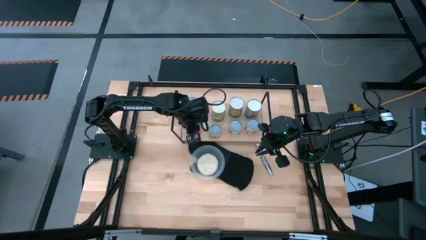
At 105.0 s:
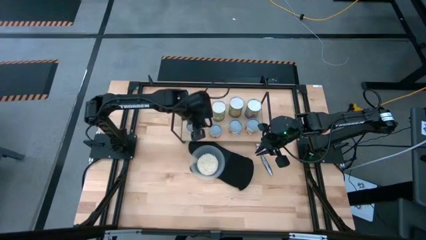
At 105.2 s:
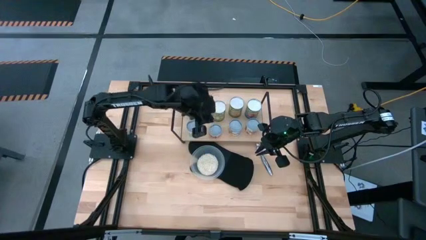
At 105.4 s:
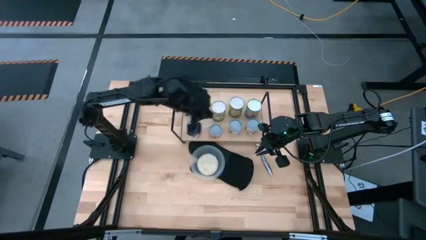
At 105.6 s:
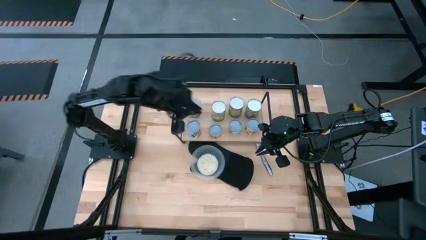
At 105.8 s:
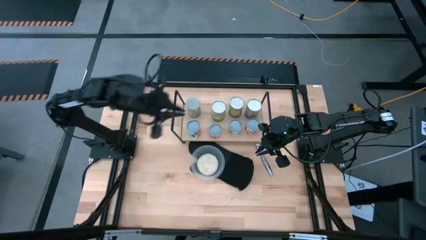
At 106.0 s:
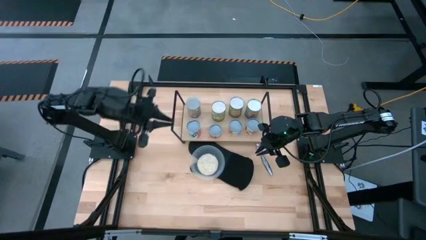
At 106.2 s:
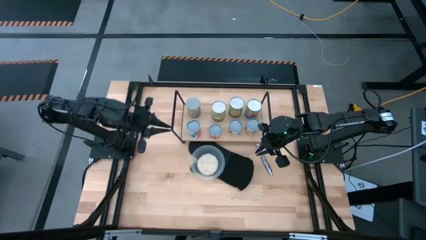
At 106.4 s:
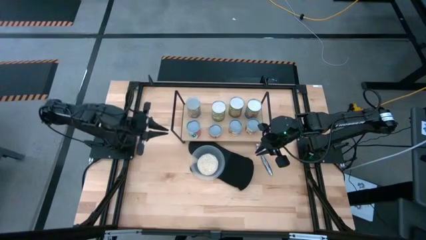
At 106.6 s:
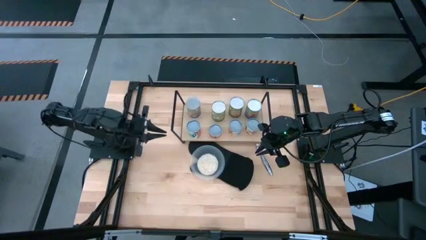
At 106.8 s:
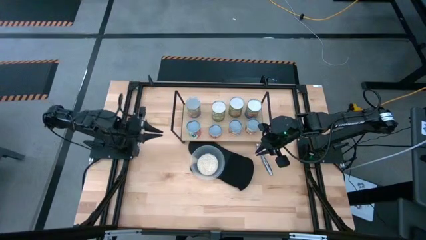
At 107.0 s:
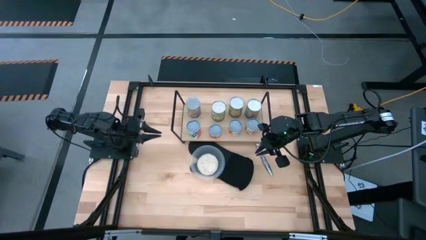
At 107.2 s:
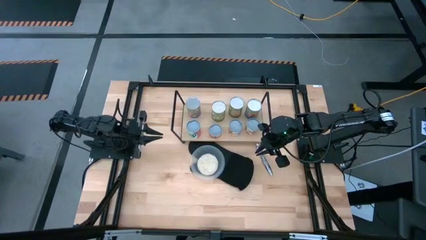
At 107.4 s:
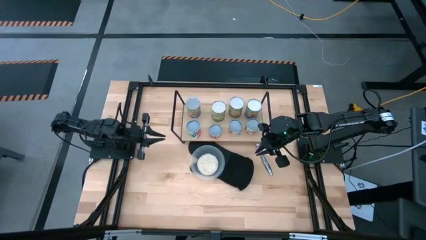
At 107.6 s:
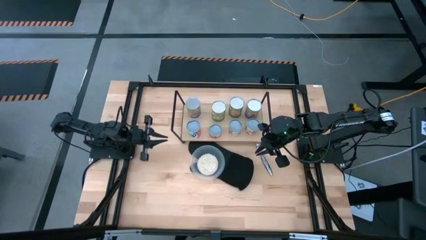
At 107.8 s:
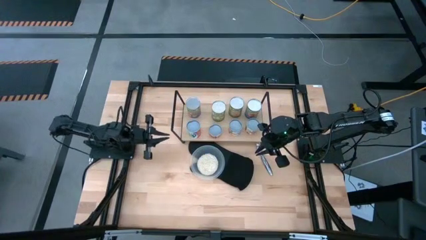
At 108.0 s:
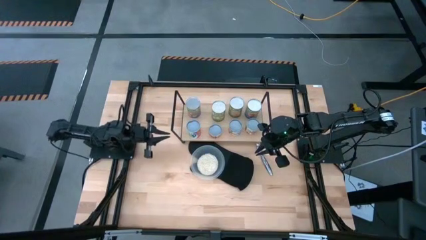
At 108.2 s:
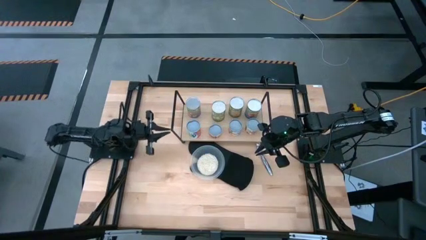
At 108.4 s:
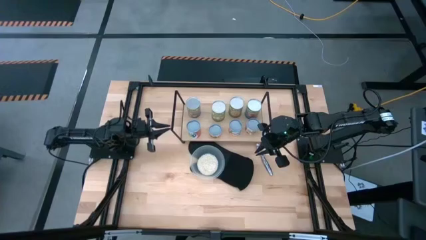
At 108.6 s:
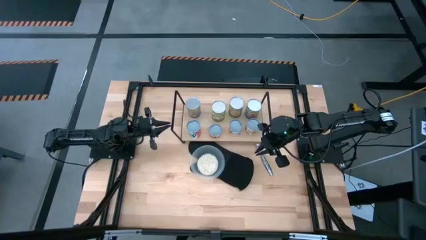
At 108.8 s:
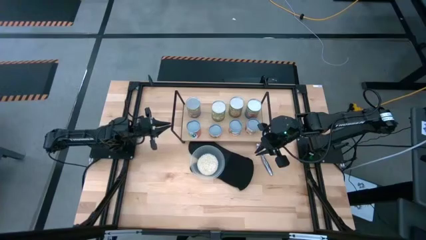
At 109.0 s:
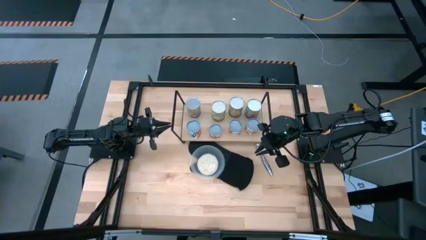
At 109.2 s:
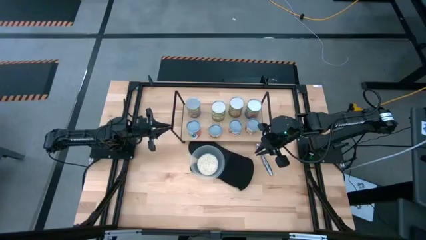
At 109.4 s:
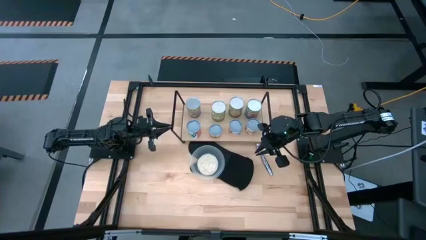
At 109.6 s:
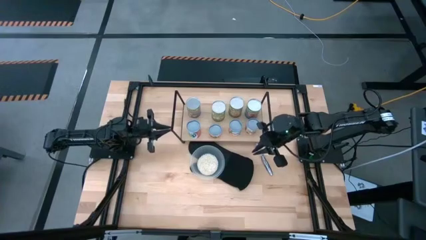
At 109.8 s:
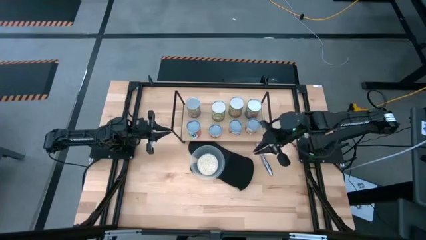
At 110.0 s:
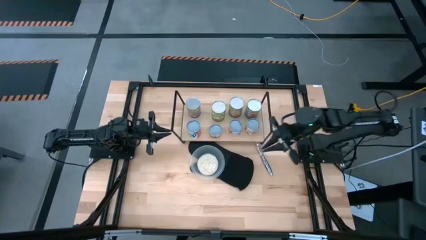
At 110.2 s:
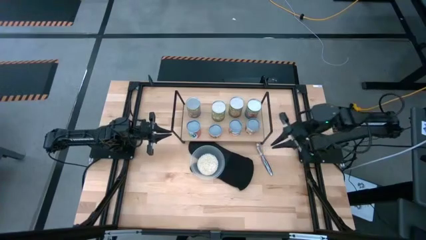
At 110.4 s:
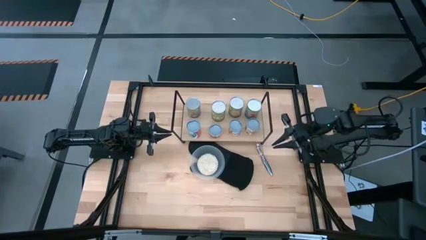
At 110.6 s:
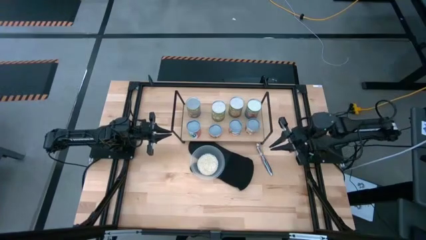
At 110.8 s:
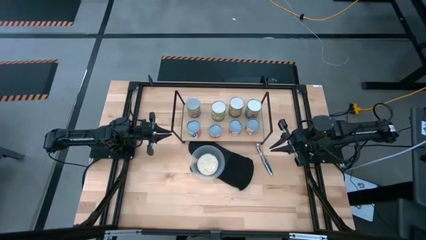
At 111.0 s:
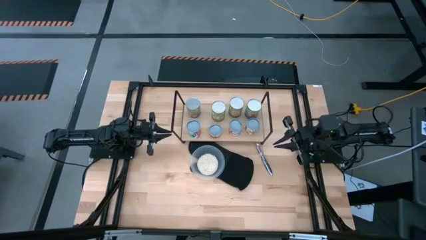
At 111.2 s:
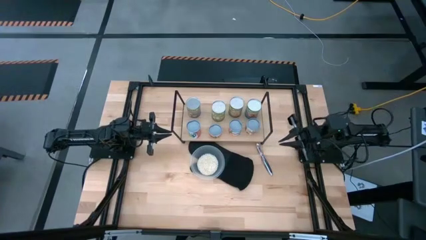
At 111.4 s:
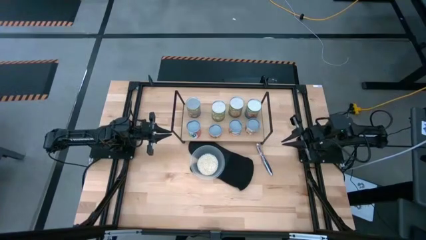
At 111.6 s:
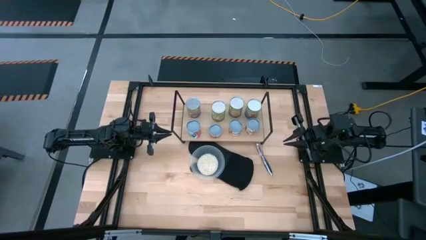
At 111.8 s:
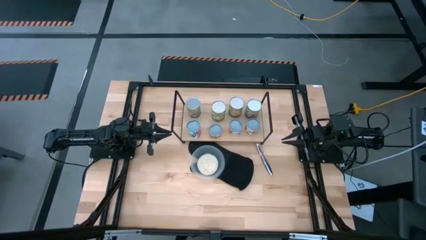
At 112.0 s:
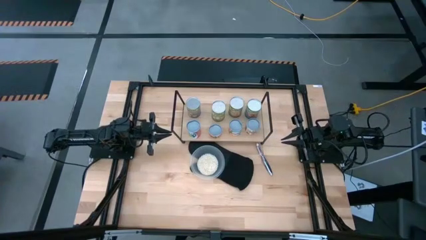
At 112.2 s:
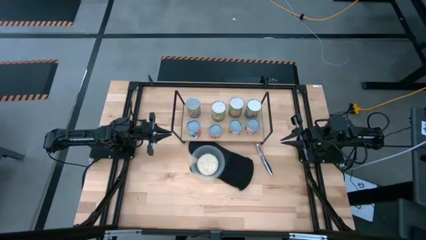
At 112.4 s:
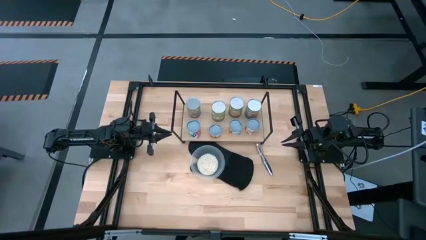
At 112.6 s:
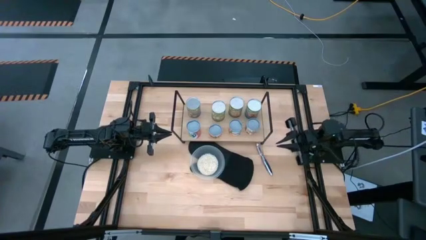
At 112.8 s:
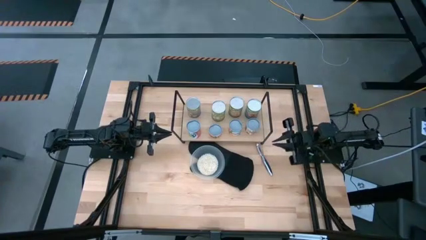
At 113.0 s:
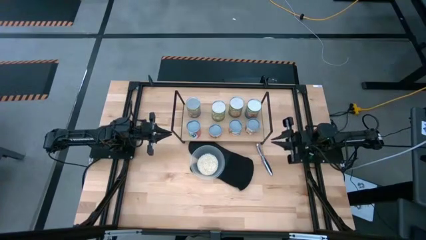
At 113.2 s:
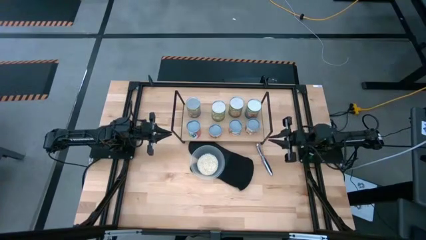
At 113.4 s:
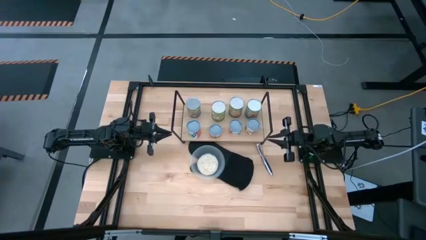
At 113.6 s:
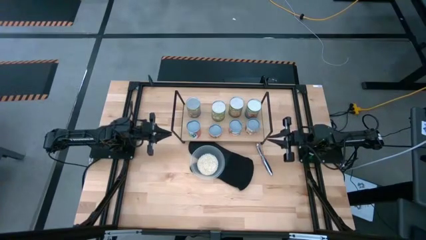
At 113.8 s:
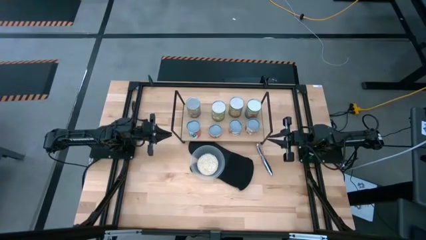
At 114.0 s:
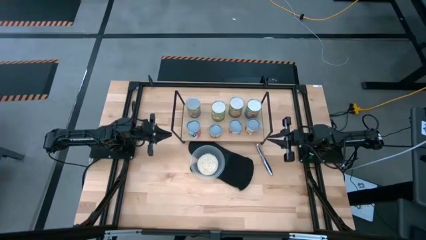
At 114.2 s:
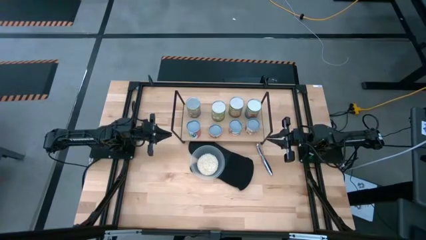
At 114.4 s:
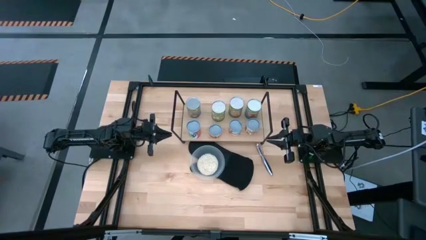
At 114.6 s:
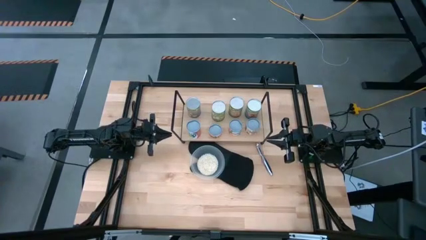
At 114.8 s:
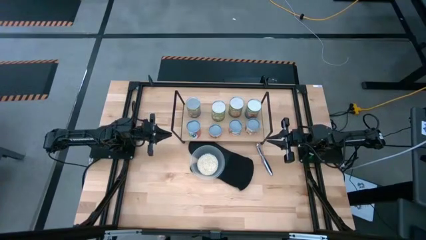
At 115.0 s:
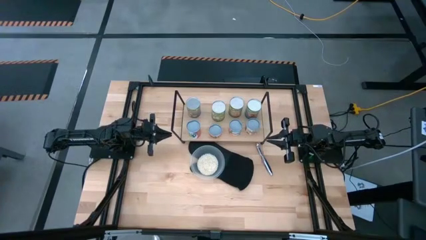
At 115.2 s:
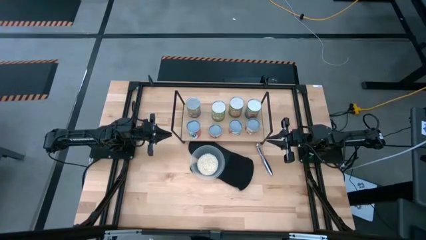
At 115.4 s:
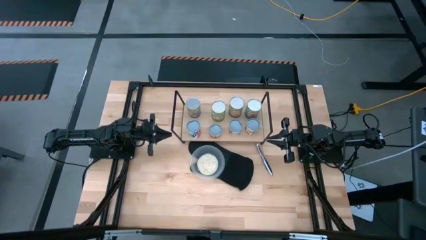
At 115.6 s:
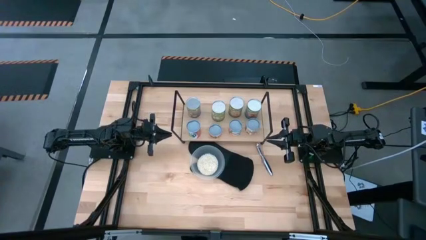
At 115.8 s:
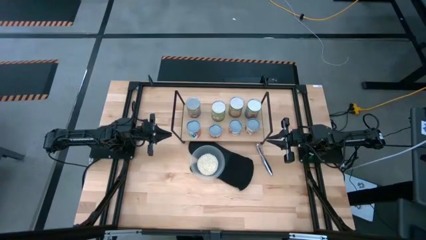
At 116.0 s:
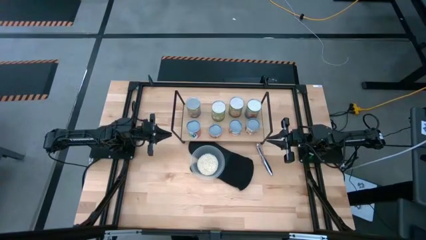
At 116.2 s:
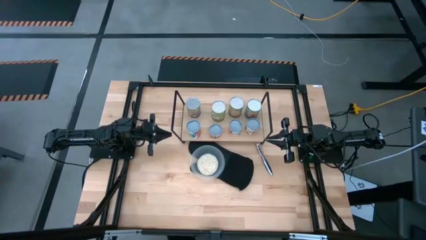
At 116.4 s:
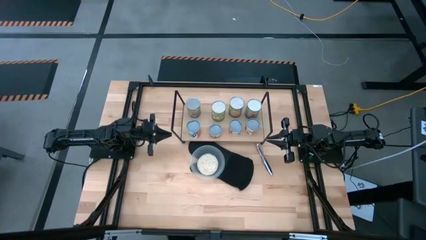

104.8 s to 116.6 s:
Task: Pick and place cans onto a shelf
Return to Home Position
